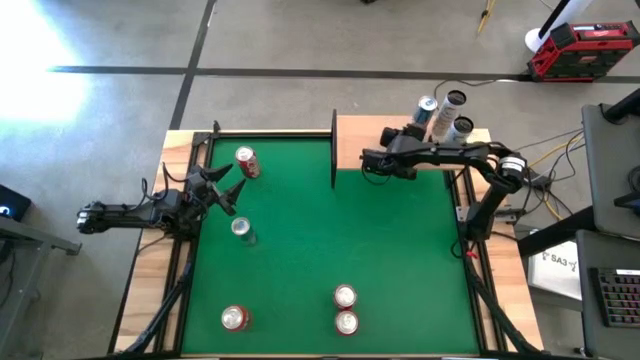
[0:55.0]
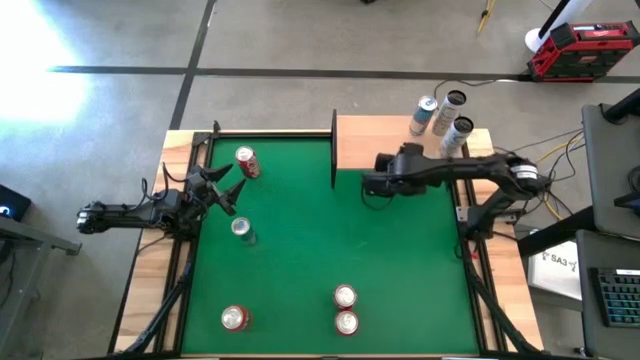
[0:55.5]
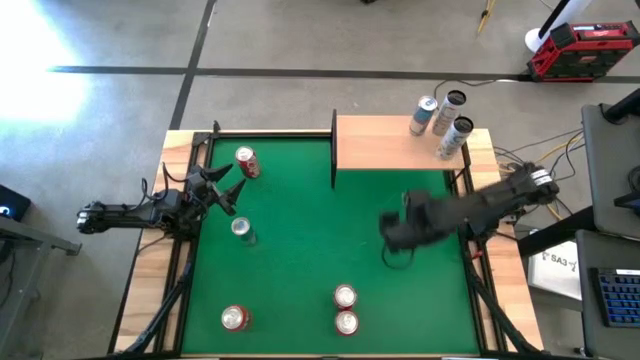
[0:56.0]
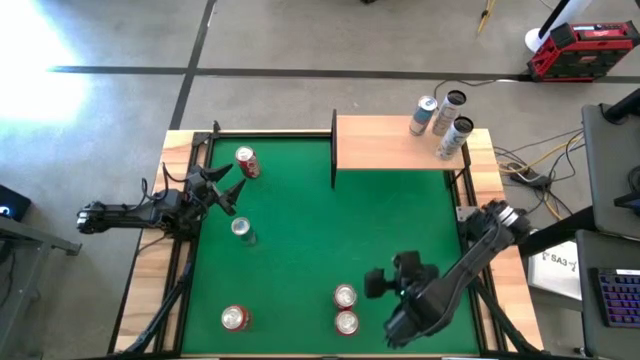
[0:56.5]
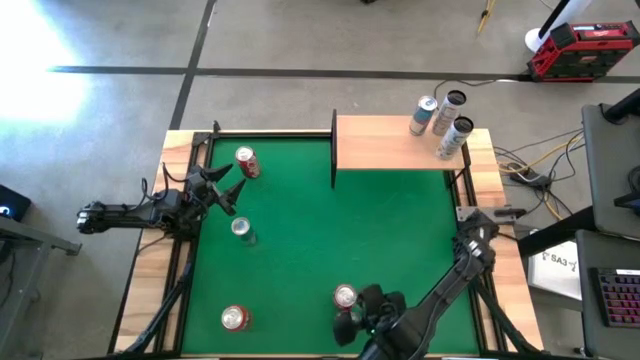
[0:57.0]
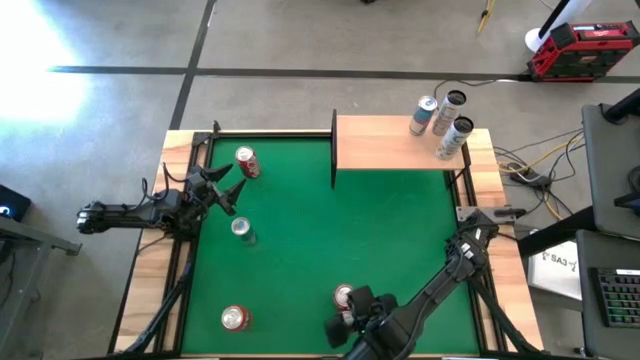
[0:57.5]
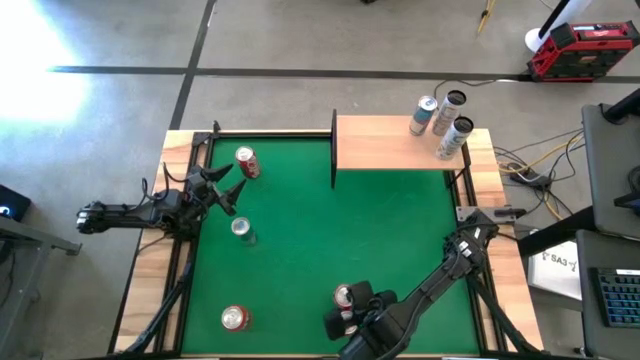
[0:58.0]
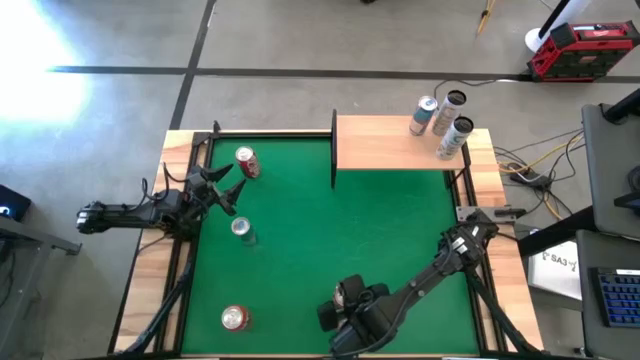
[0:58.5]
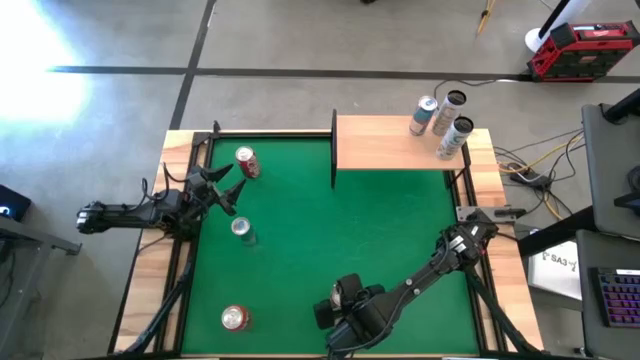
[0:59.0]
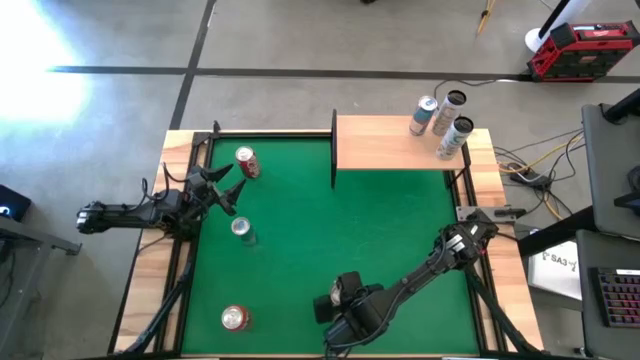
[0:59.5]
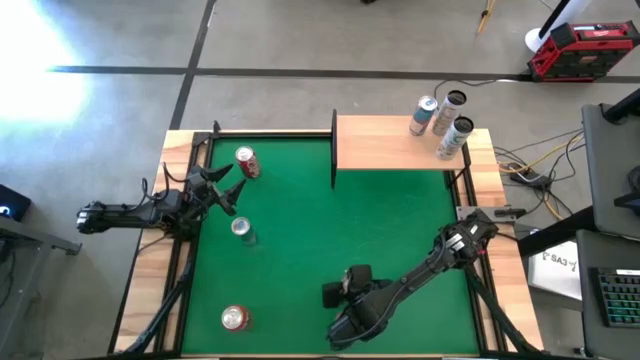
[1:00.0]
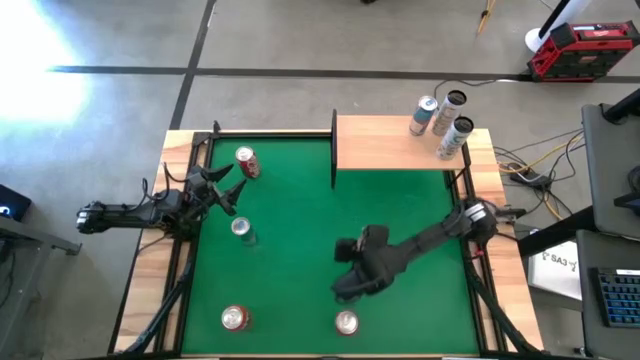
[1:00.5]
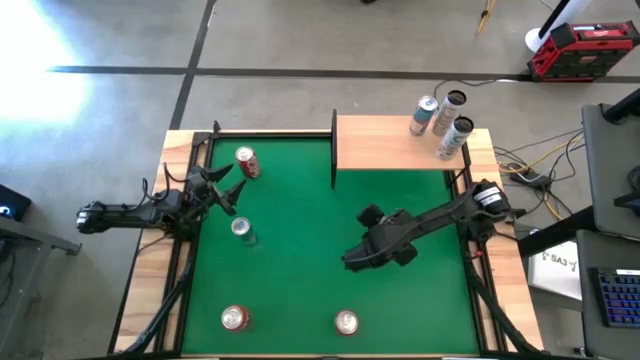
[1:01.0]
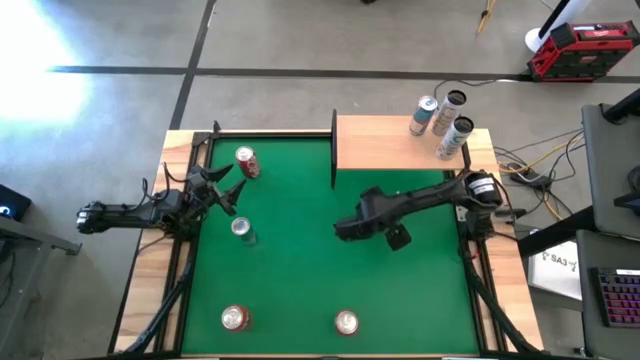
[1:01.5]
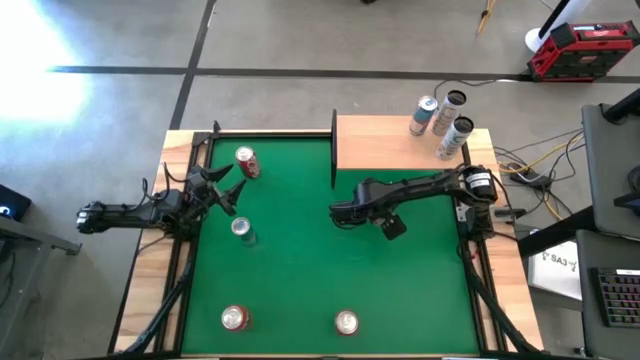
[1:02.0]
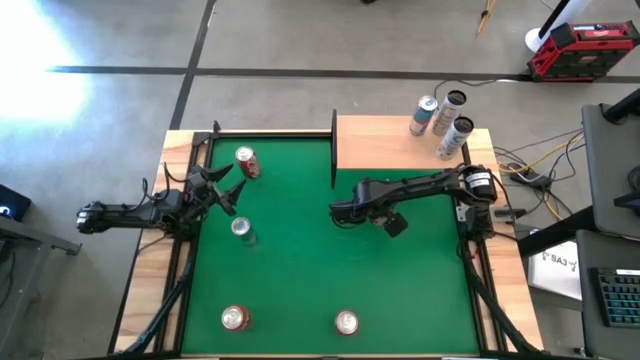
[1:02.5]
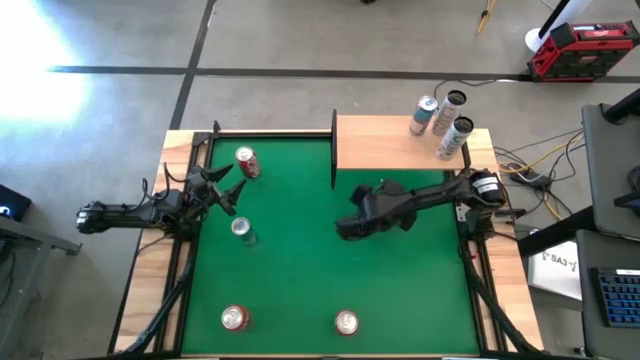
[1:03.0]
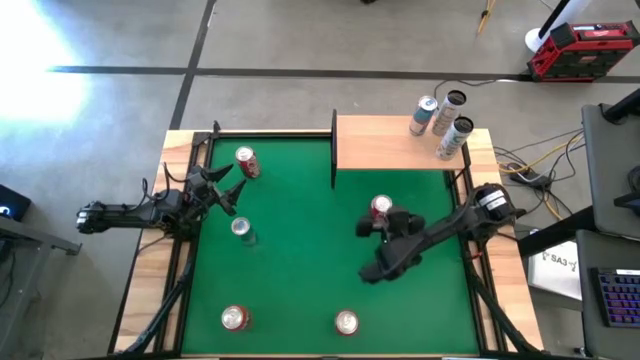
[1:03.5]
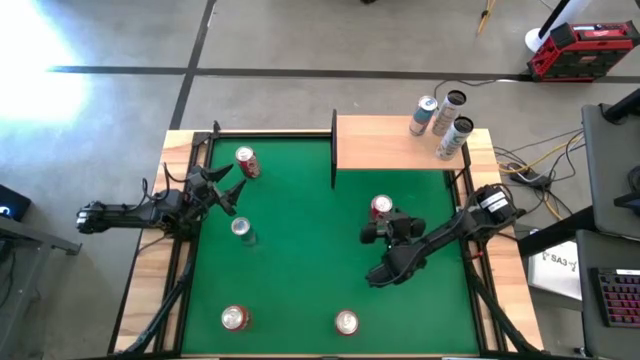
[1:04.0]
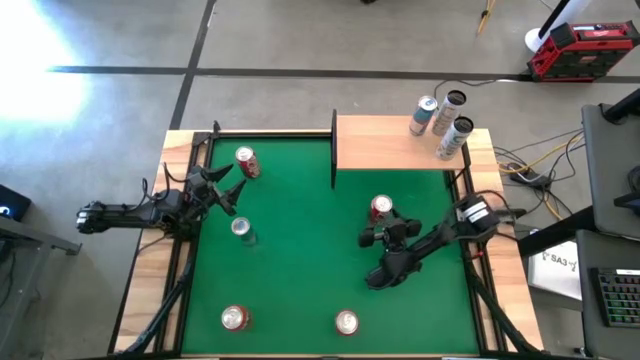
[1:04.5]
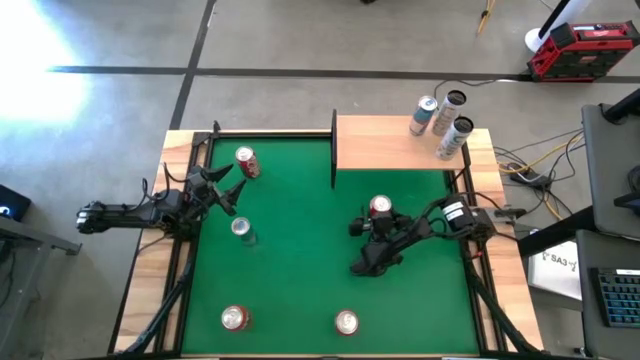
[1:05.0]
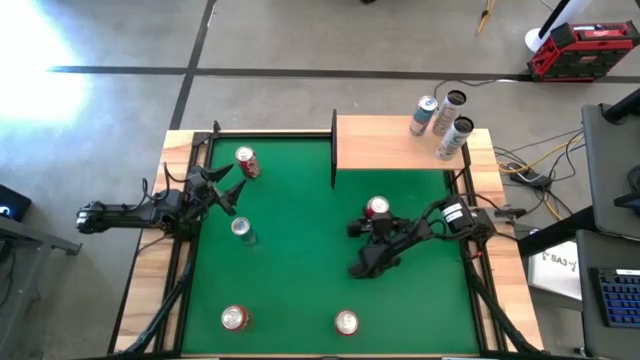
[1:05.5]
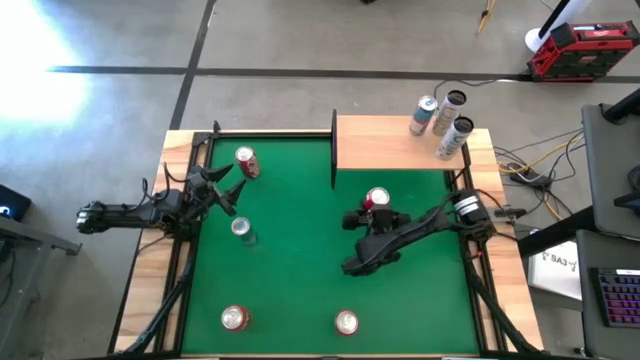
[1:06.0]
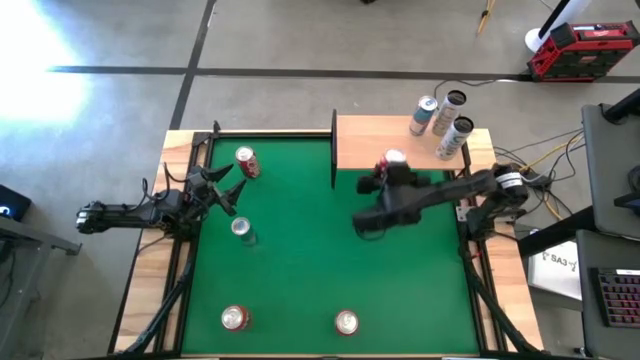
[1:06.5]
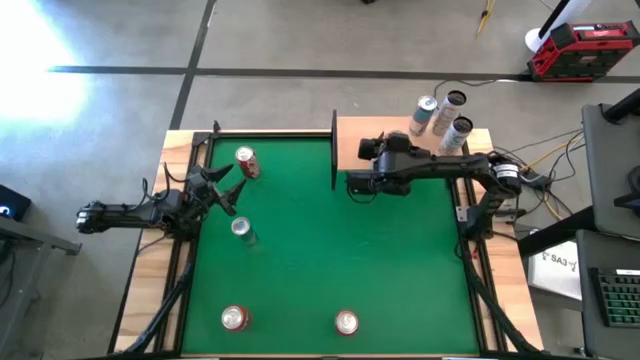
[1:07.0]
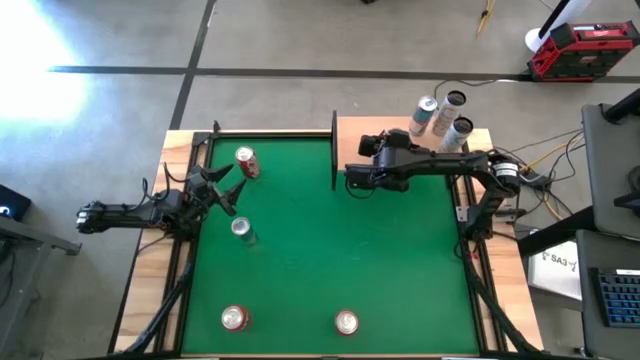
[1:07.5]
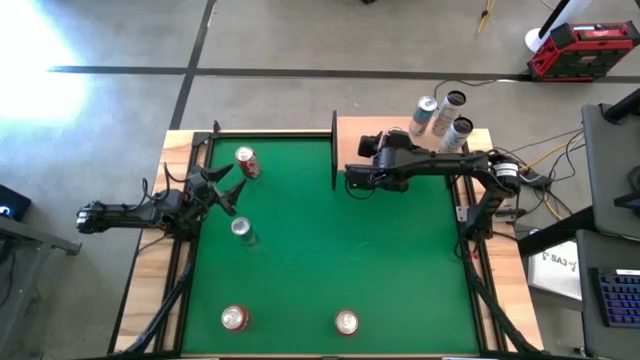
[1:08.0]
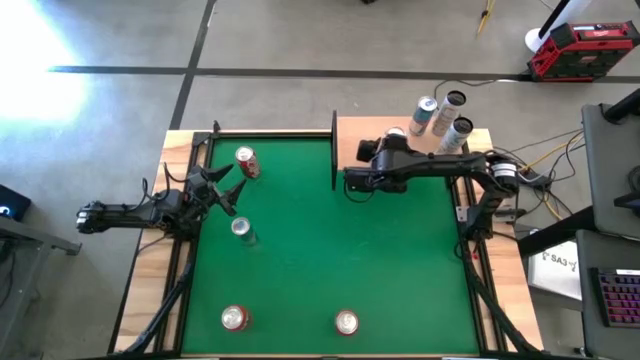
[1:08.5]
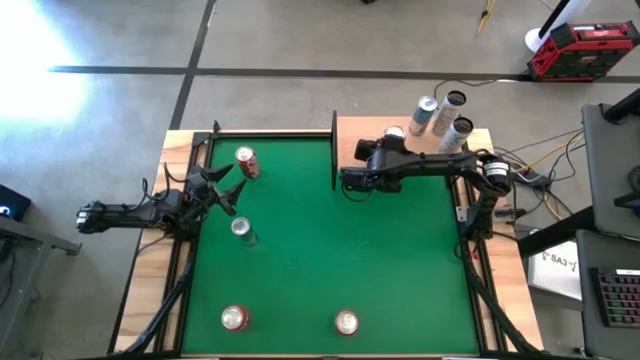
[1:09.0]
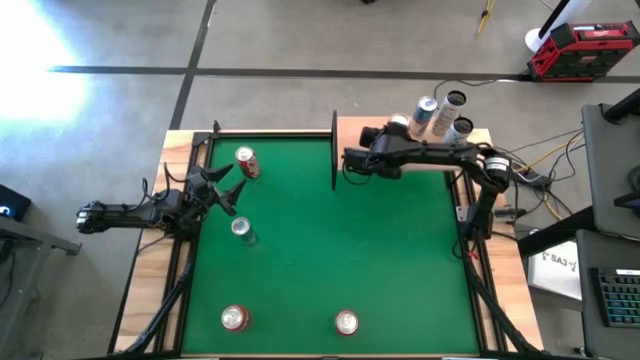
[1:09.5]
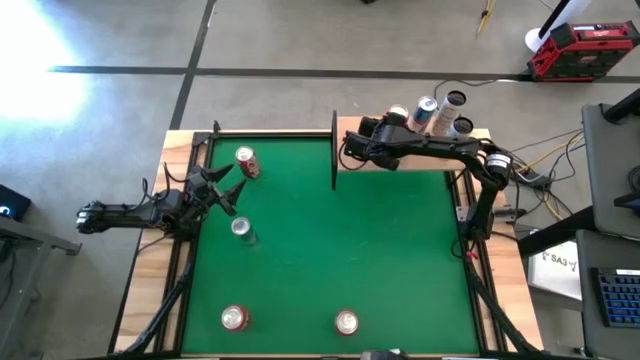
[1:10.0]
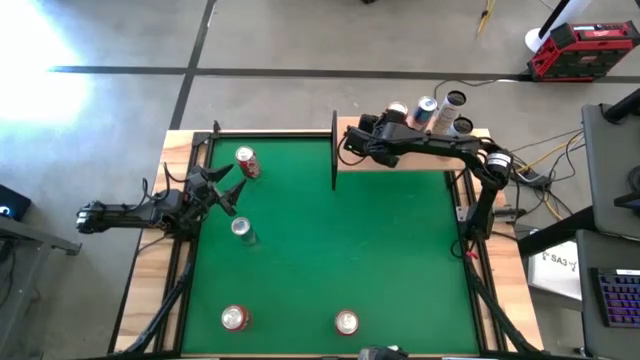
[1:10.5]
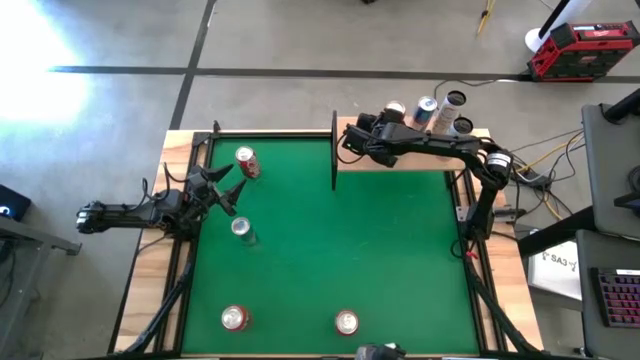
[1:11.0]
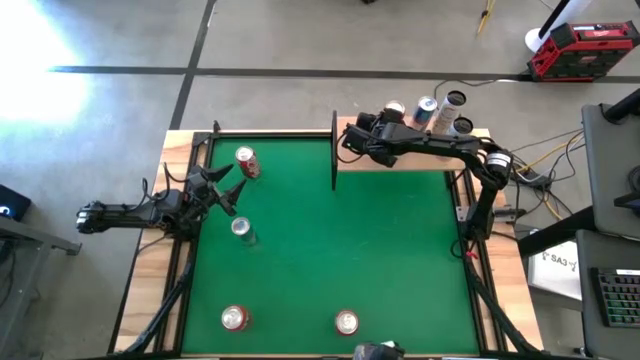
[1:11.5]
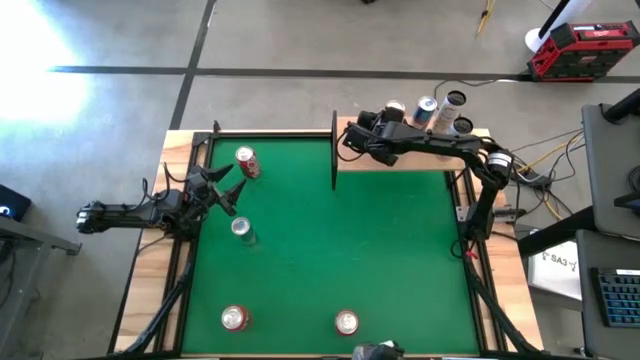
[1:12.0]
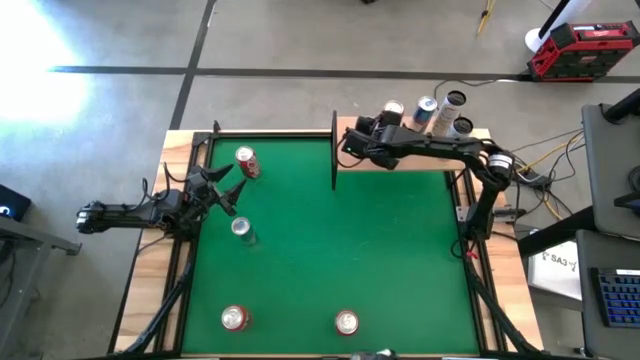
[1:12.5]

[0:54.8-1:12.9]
Task: Place canned beverage on shelf
Put the bottom red white soda can on the shelf

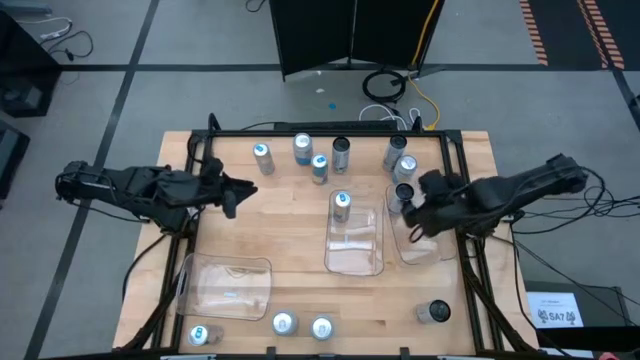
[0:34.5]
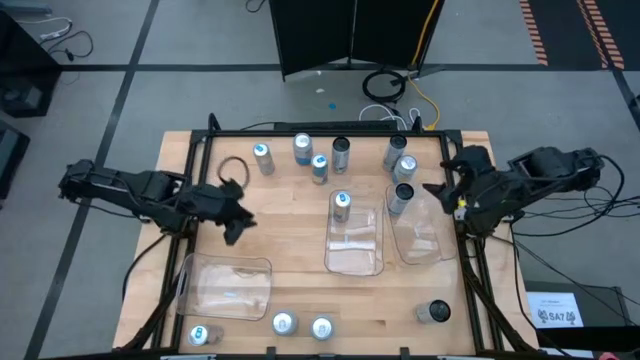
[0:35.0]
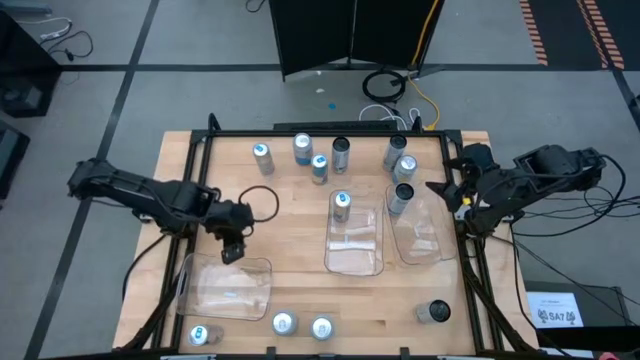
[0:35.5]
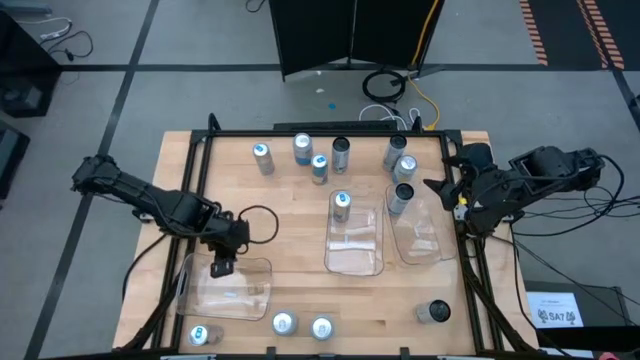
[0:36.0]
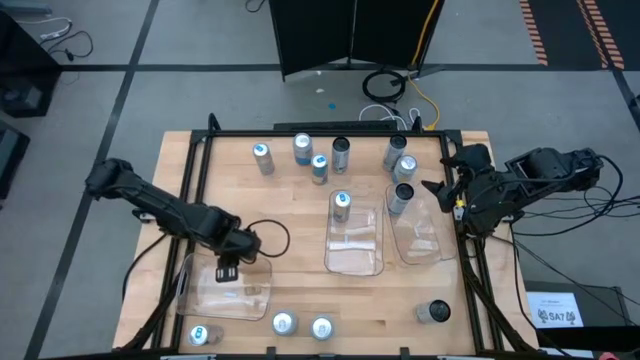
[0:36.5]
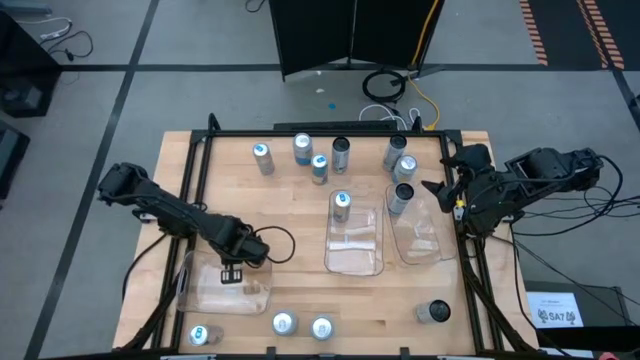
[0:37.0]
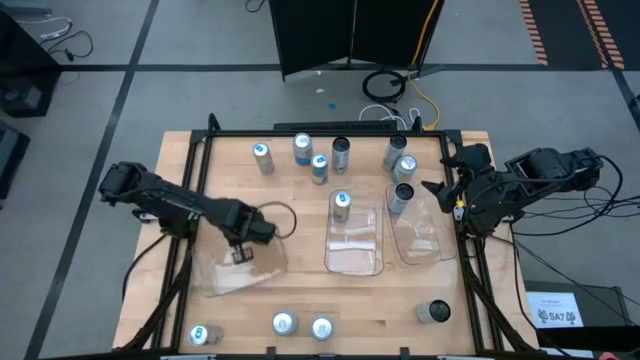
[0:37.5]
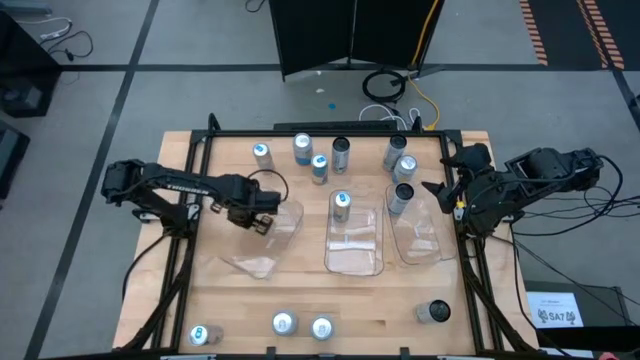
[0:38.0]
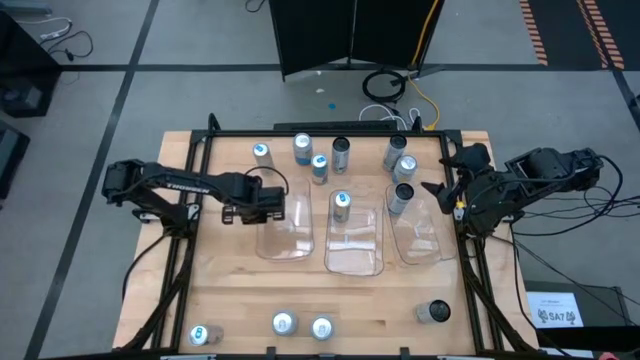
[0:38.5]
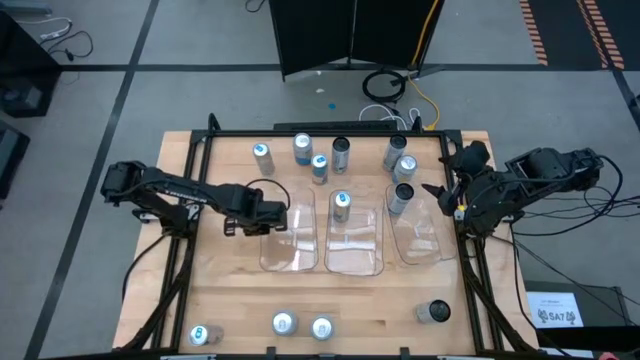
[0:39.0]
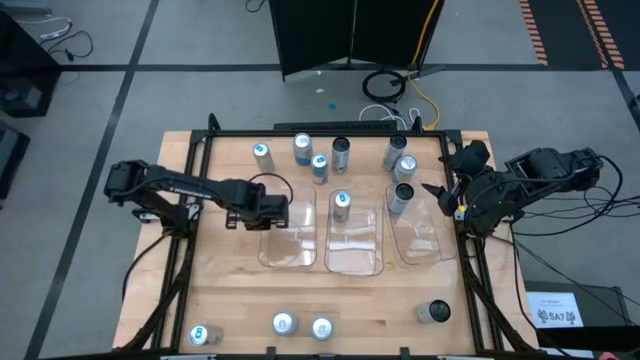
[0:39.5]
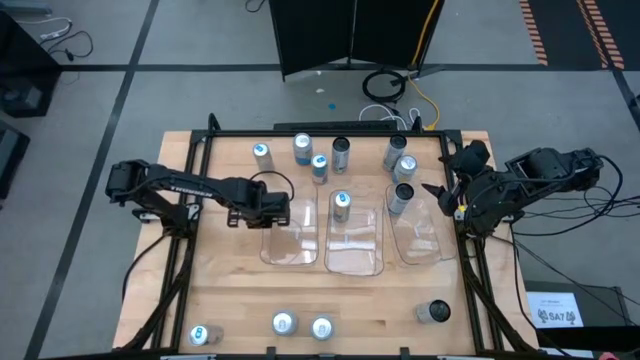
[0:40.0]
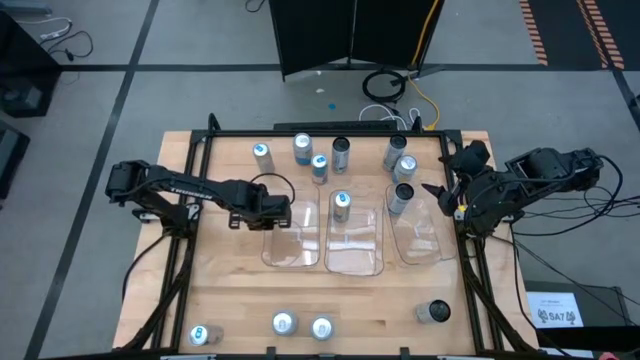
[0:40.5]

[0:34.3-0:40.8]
Task: Sort soda cans
Move the left transparent bin to the center of the table
